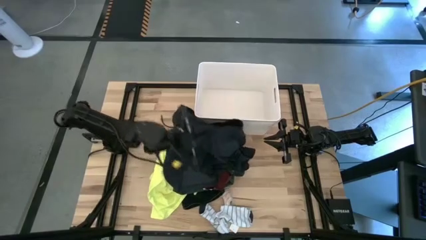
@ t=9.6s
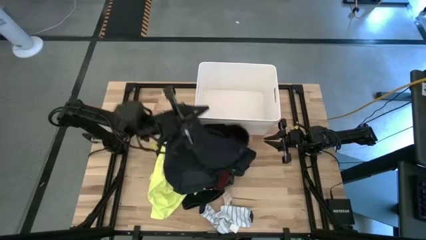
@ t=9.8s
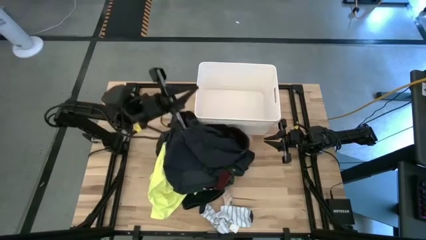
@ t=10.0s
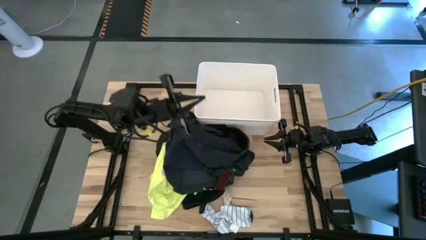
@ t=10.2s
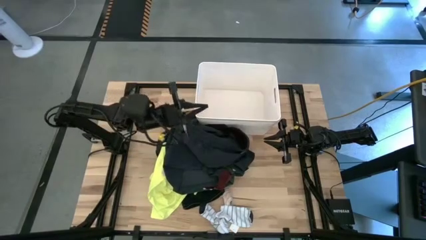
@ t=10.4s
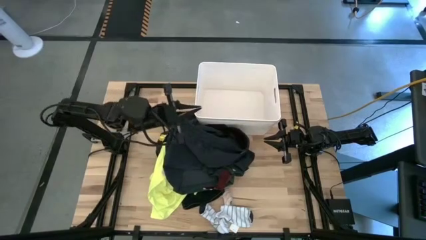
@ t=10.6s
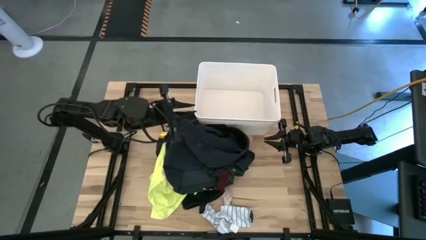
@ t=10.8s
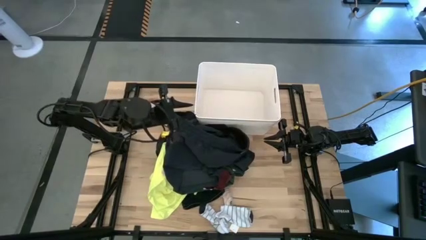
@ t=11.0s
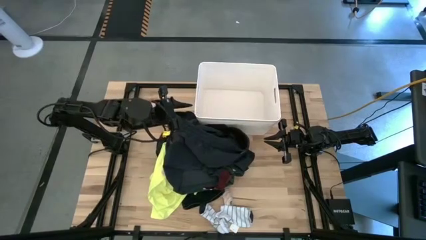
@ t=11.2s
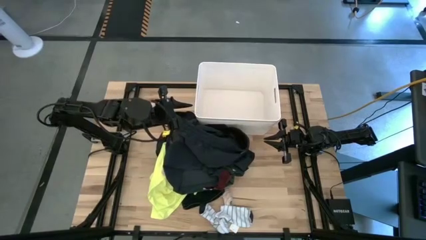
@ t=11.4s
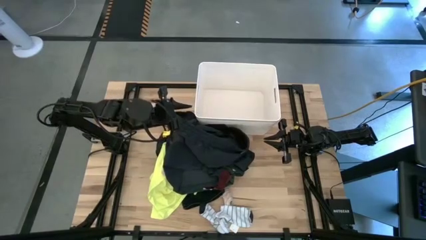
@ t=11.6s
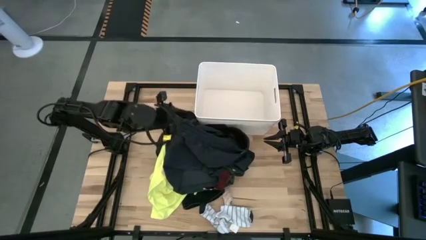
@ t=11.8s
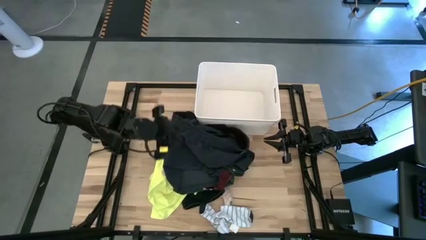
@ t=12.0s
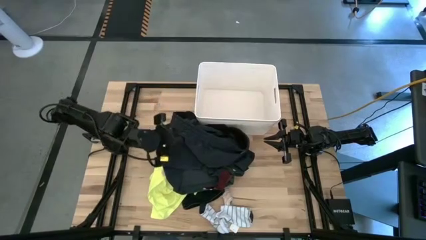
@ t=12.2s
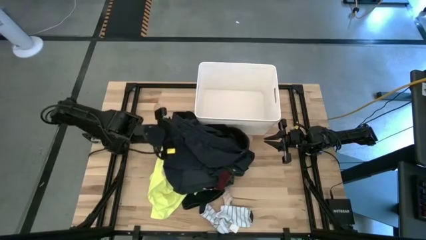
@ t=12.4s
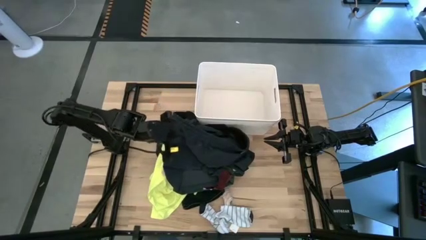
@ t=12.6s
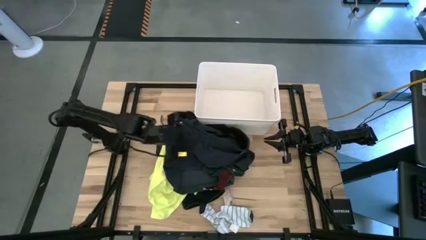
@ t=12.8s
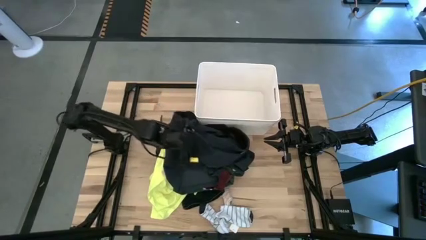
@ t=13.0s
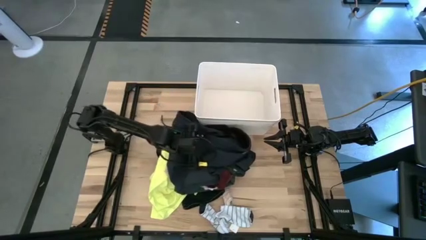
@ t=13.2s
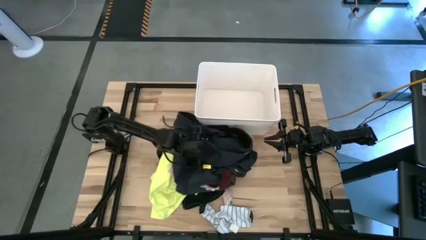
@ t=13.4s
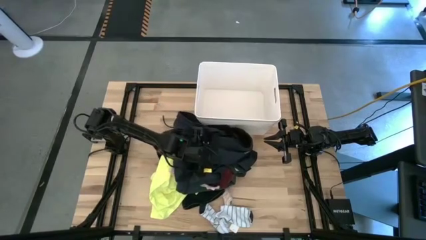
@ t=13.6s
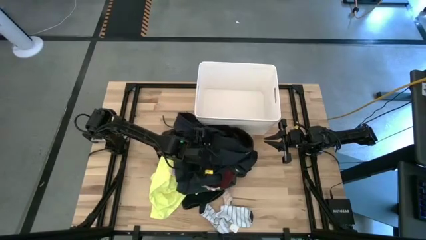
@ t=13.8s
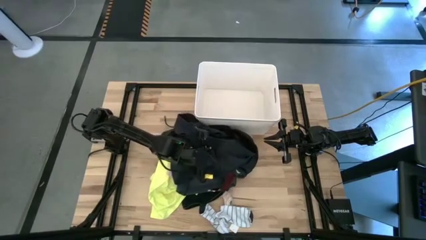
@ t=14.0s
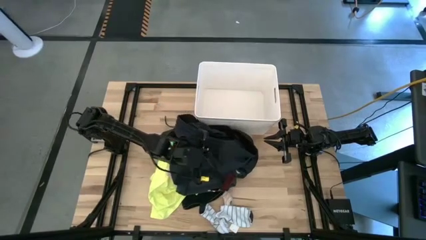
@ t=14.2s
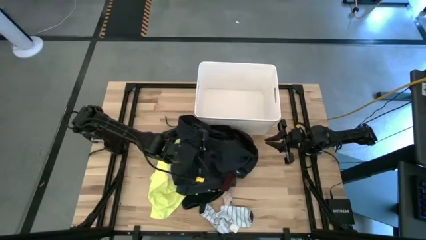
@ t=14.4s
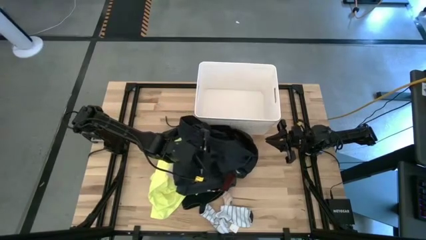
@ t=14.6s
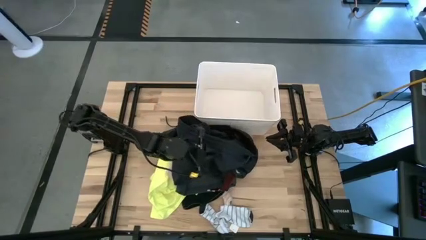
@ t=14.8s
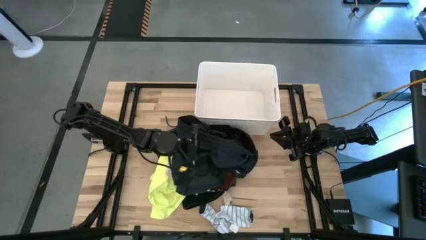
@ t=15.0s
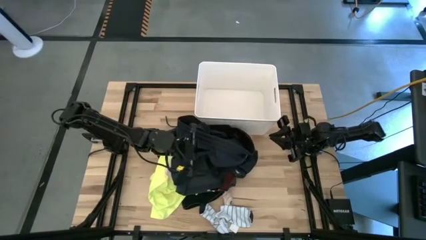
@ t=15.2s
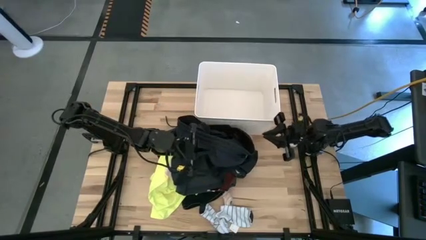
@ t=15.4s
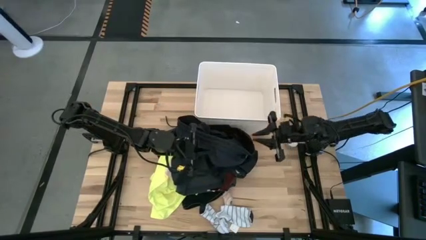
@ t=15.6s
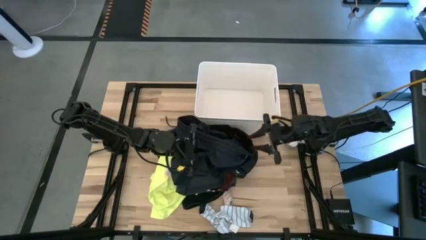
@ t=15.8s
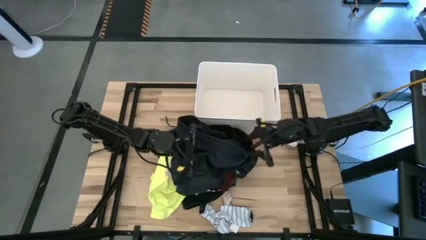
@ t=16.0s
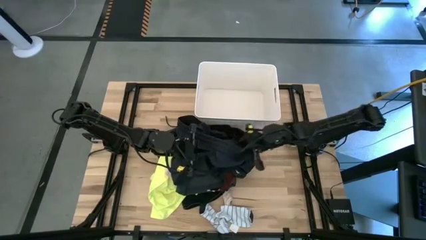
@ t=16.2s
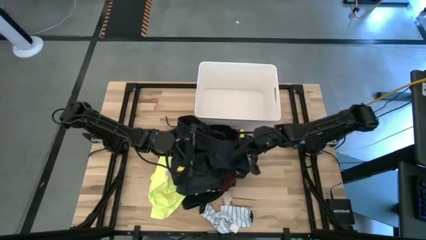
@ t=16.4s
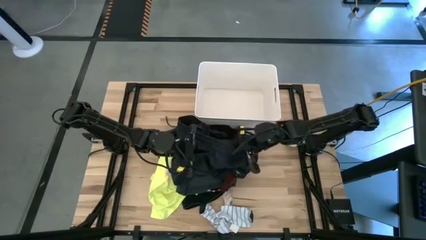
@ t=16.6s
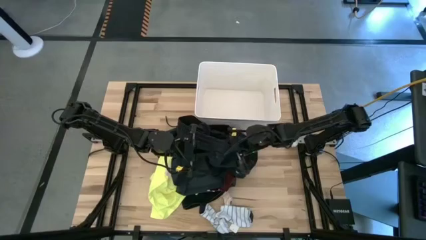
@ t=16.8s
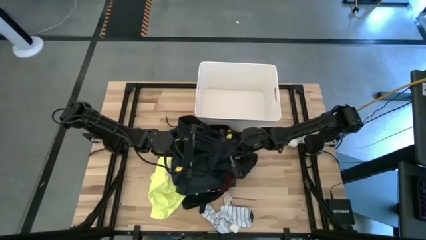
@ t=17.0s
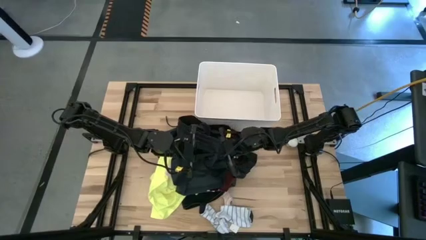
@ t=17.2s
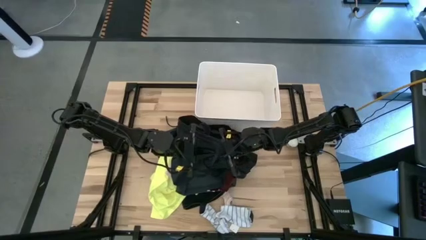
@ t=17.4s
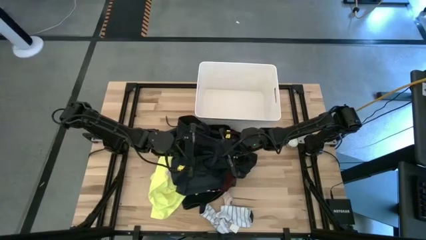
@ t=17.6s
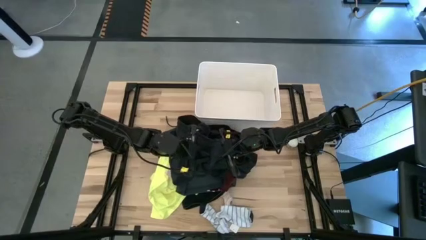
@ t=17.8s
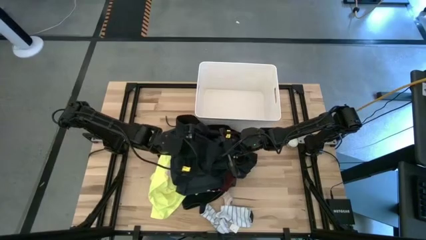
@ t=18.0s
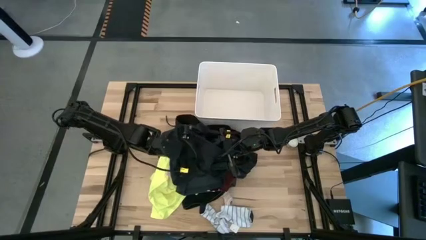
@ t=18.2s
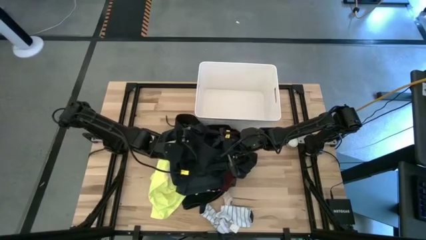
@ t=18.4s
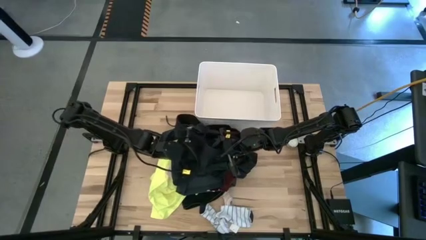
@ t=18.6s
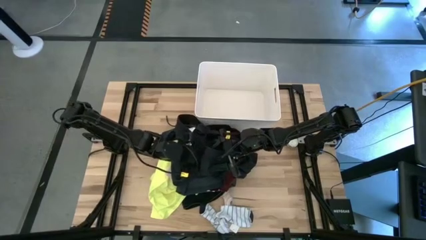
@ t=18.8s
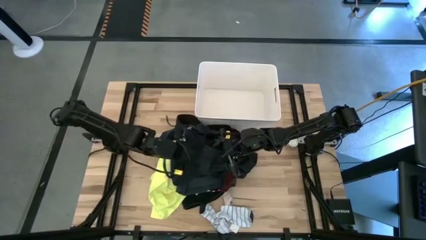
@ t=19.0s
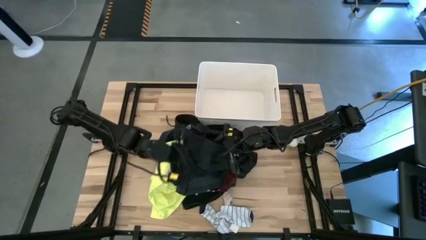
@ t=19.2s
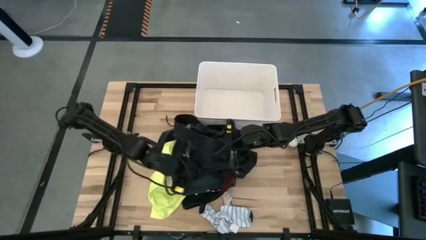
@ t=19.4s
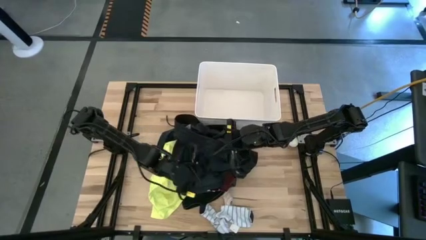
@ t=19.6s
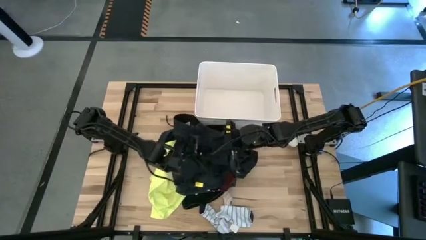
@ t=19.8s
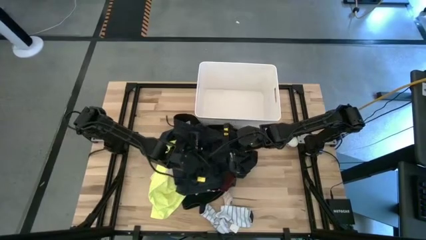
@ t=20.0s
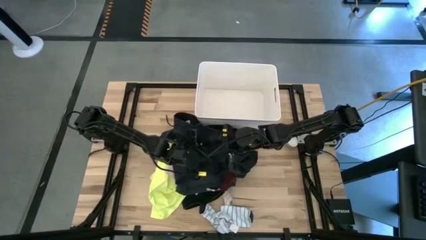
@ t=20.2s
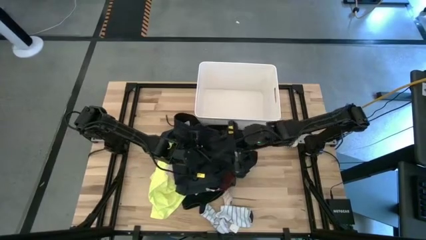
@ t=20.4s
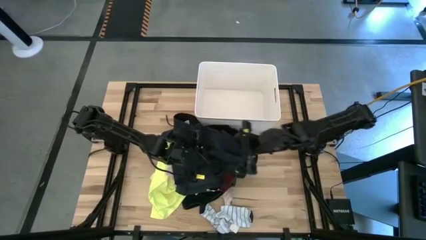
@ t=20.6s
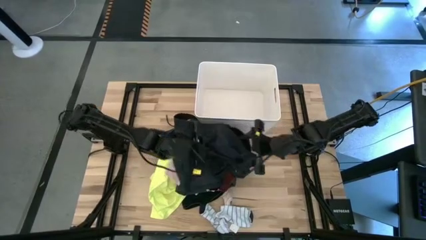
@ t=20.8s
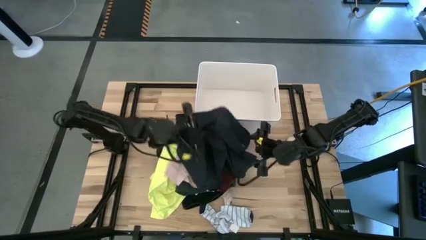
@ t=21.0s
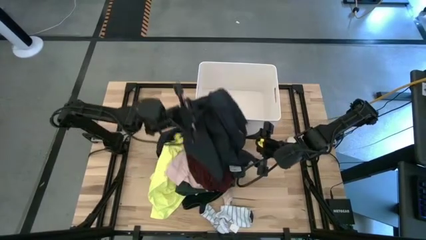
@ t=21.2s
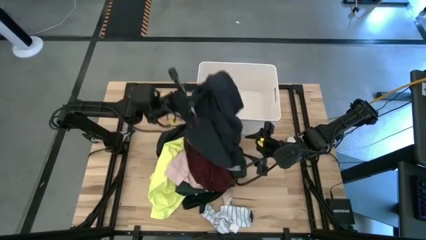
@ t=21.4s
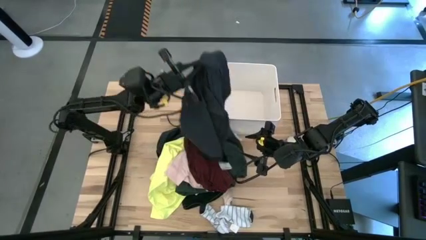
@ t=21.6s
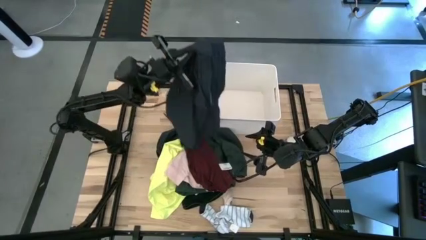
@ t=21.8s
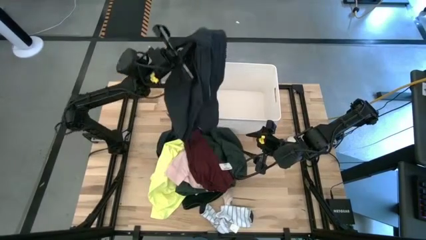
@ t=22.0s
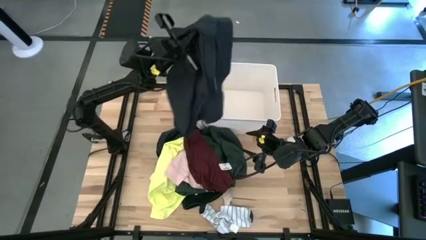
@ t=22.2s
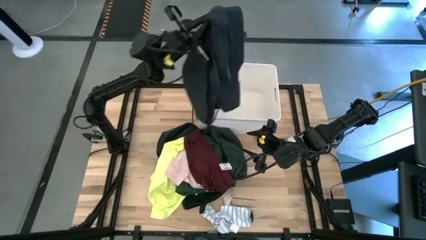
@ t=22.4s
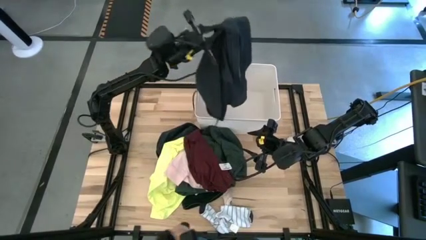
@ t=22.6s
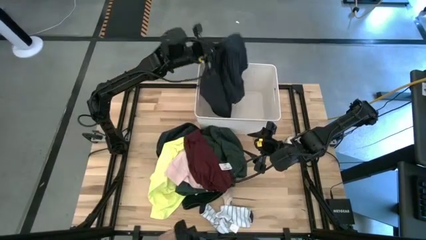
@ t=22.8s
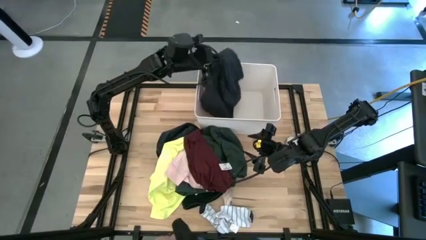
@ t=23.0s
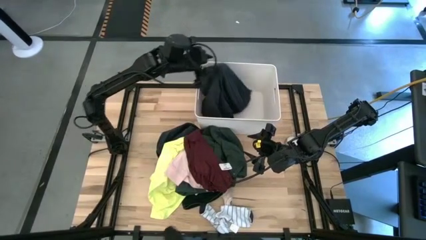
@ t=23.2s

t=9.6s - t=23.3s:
Task: Sort clothes
Put the black shorts into the white laundry organizer

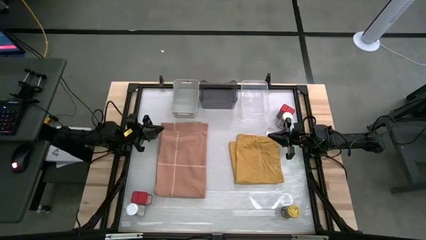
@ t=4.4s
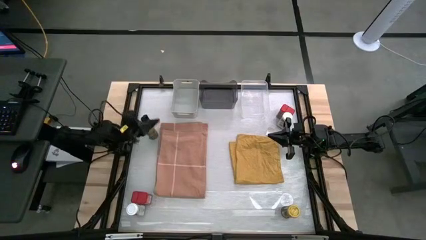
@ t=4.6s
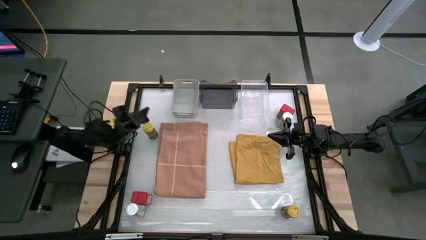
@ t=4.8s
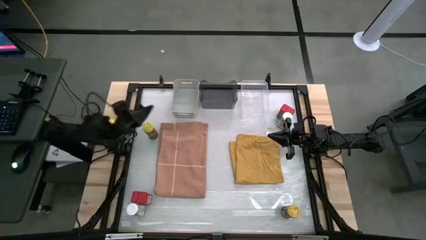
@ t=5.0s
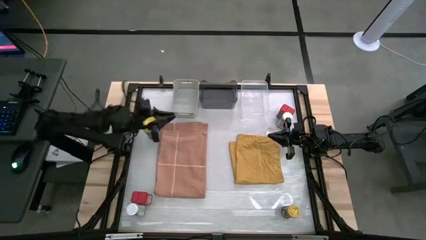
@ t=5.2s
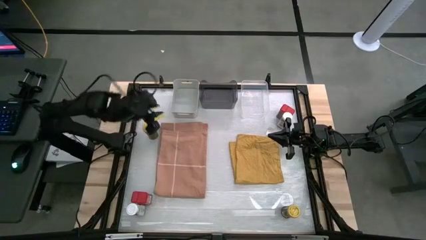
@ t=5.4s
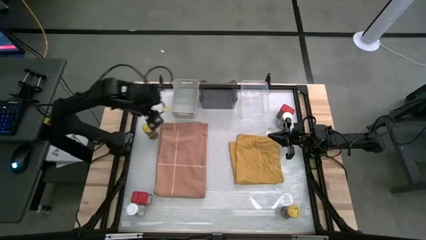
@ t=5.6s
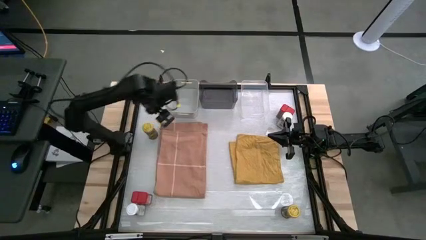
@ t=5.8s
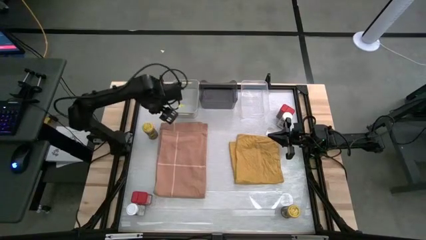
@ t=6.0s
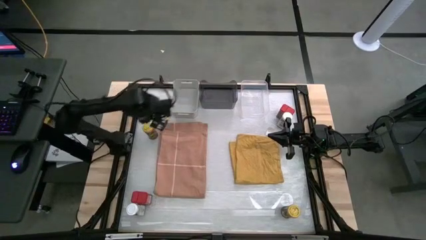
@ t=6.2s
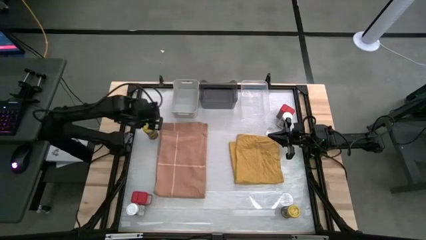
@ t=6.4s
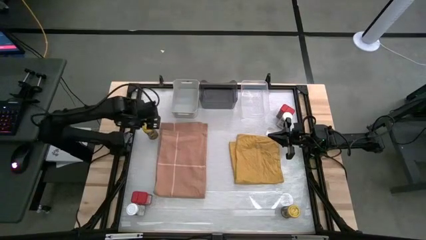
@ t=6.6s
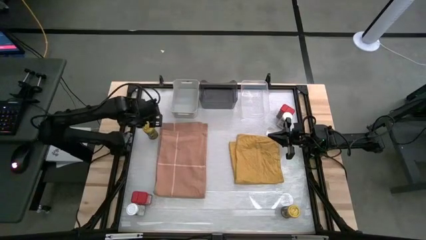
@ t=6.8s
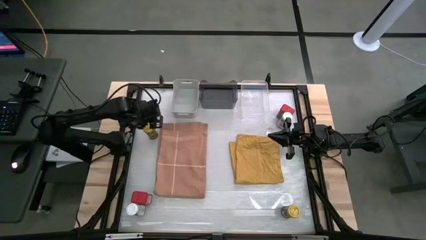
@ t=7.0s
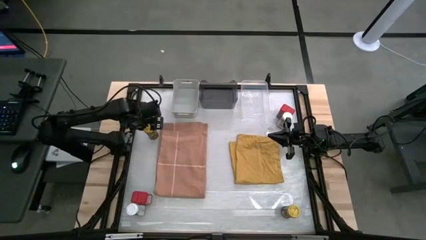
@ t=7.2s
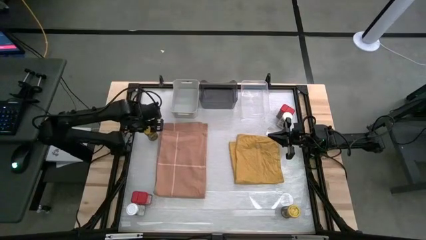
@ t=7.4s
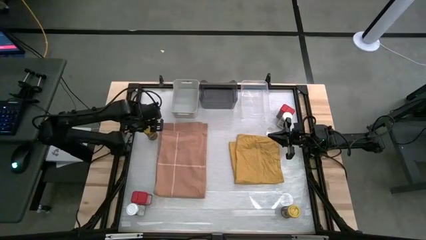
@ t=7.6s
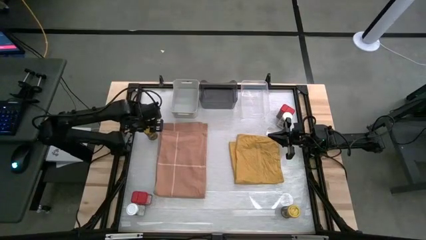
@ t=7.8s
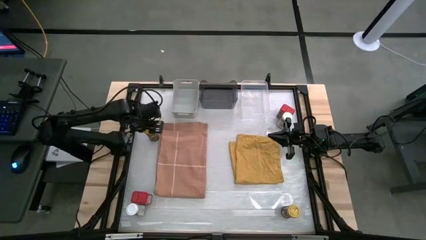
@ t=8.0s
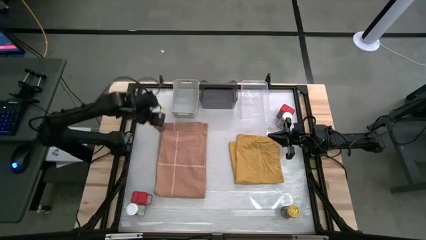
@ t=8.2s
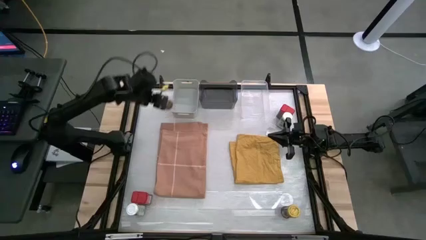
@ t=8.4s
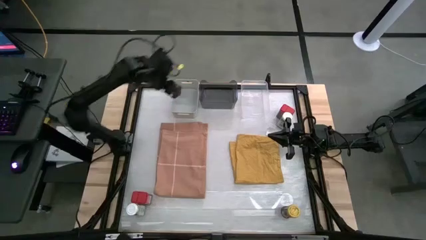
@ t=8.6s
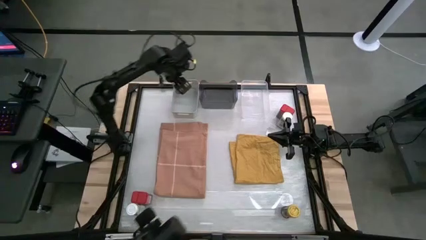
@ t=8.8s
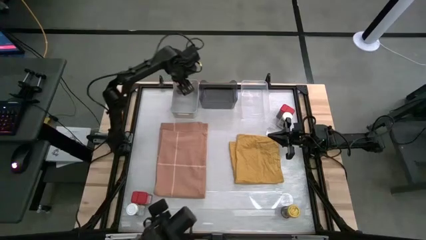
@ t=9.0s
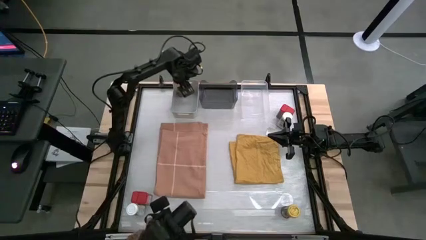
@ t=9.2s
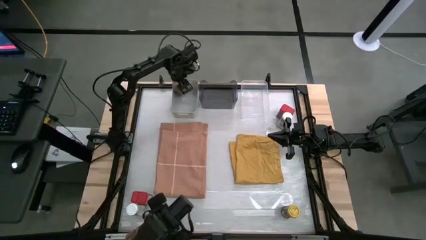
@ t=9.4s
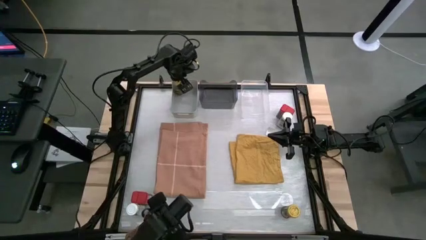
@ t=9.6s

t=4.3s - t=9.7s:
Task: Sort spices by type
Put the top yellow seasoning bottle into the gray bin
